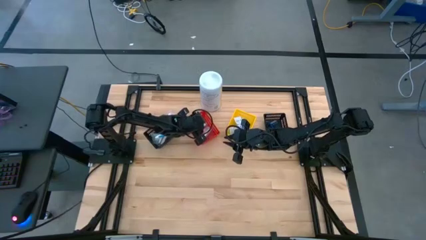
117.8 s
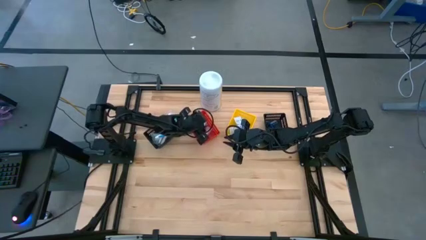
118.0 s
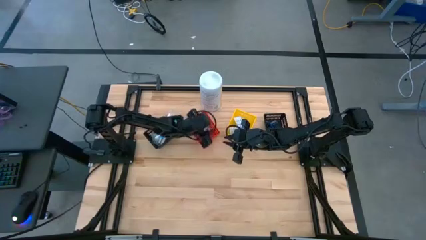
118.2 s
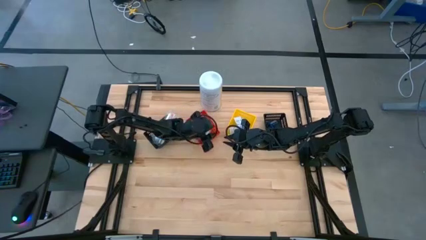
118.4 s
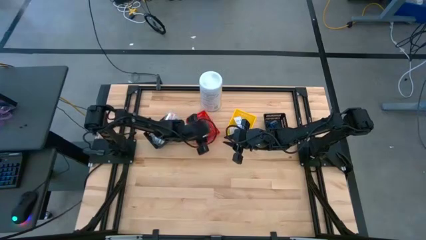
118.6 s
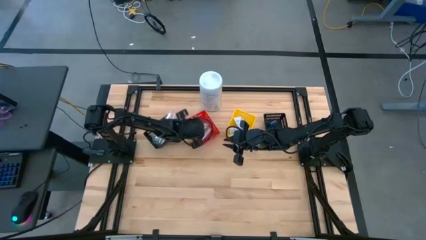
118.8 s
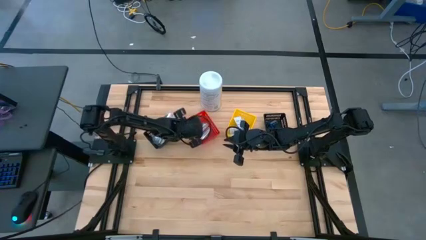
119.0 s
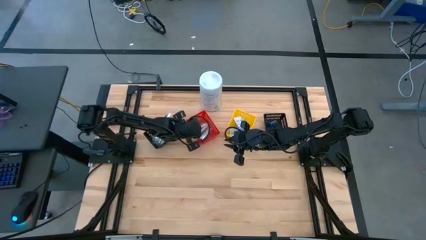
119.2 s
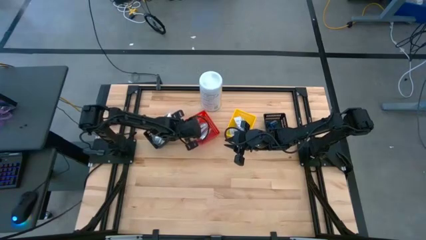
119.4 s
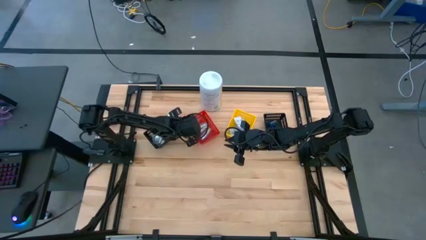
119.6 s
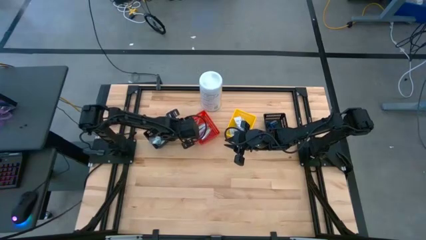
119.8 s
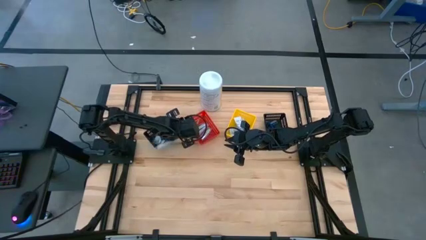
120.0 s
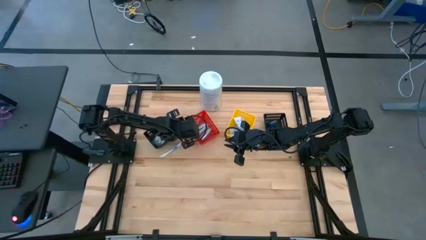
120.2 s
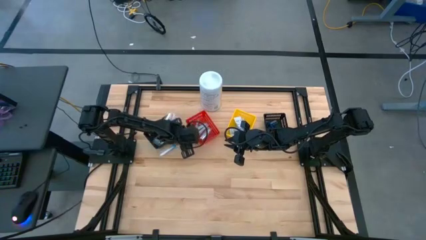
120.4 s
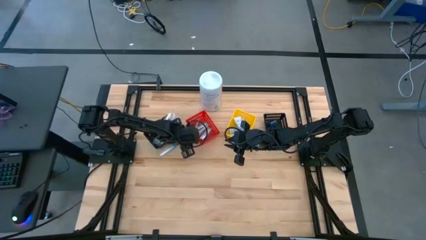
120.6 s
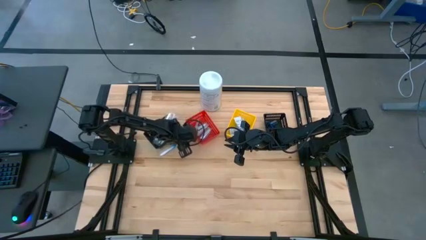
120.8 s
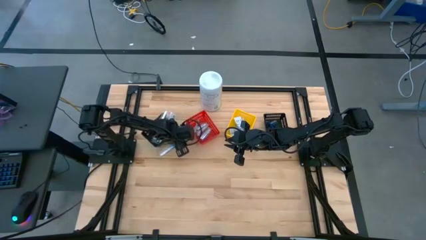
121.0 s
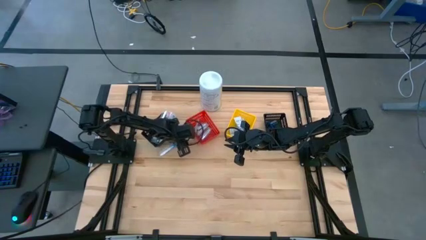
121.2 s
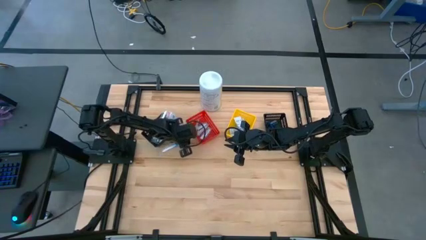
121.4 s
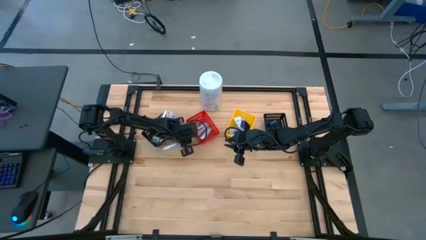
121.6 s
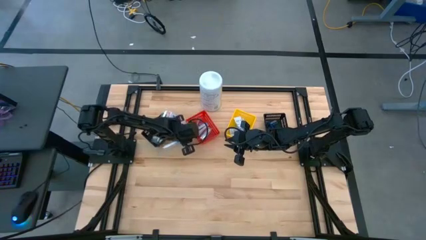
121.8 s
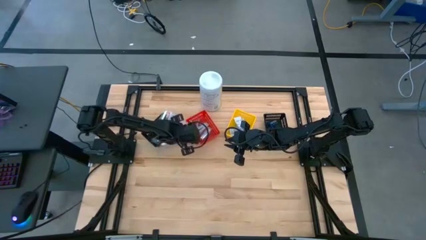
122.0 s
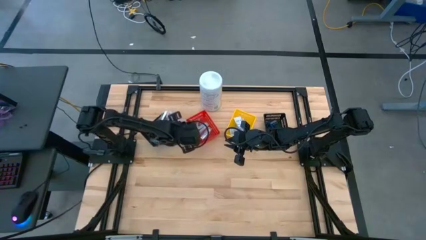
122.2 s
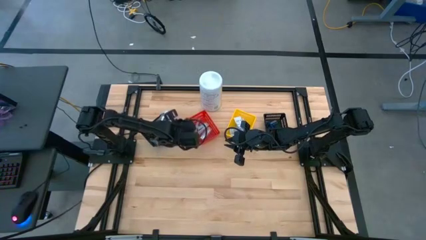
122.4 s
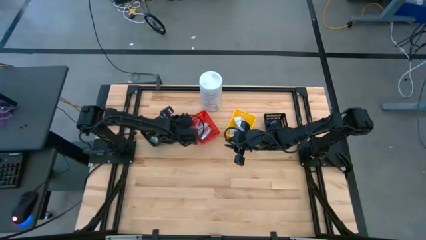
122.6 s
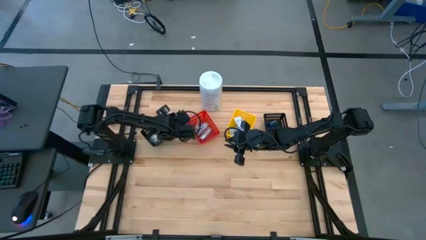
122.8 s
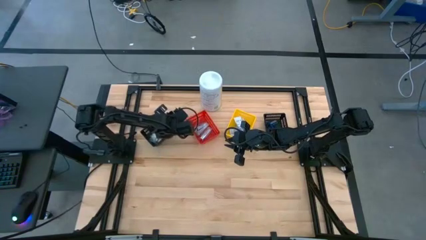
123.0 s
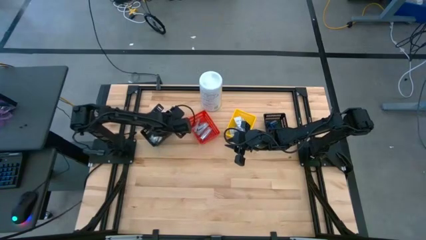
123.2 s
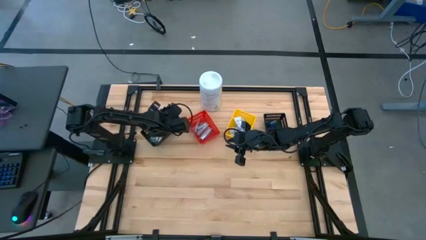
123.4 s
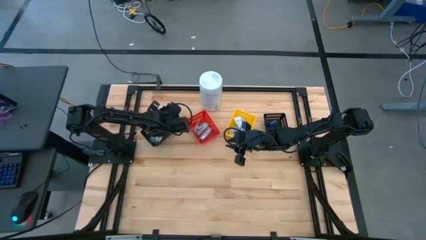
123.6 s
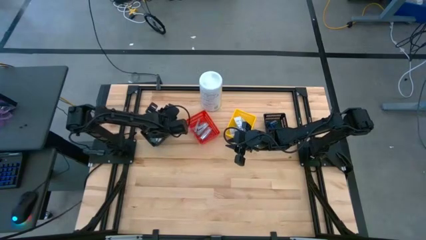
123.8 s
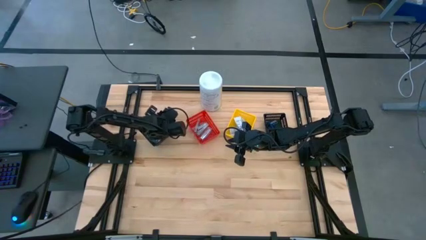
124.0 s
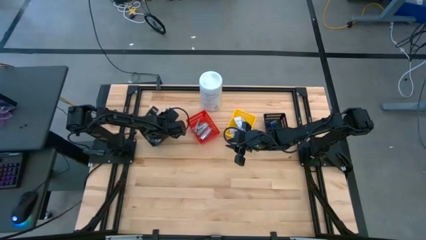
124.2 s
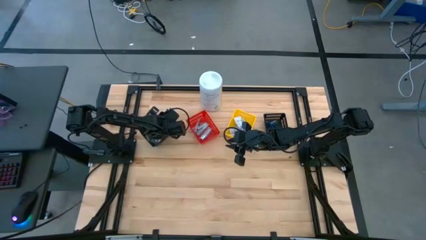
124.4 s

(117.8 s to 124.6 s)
Task: Pick & Place Travel size toiletries
Put the blue toothbrush into the left black basket

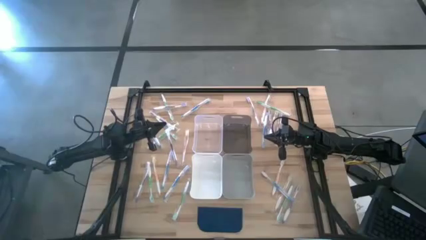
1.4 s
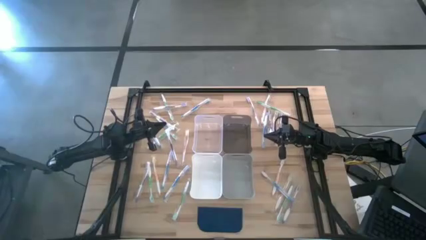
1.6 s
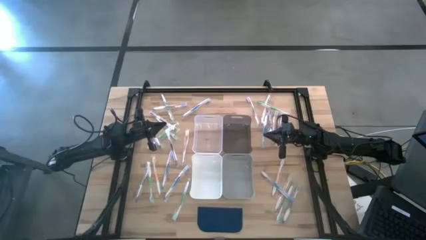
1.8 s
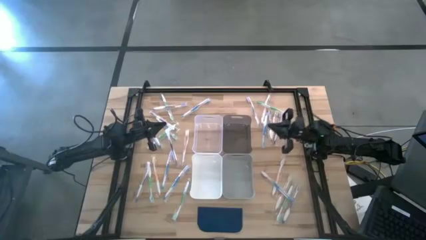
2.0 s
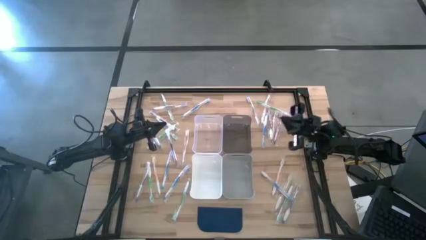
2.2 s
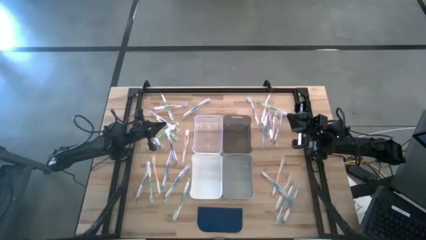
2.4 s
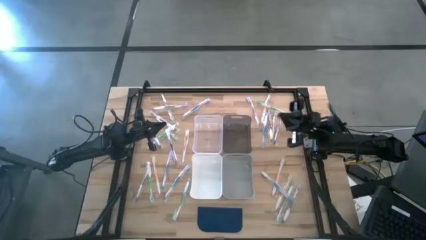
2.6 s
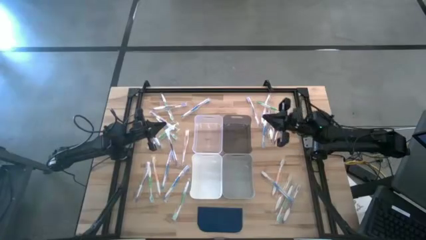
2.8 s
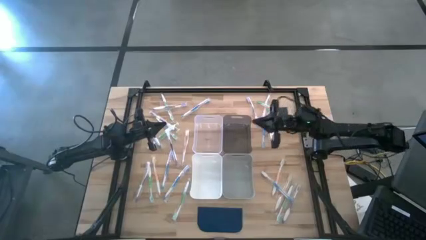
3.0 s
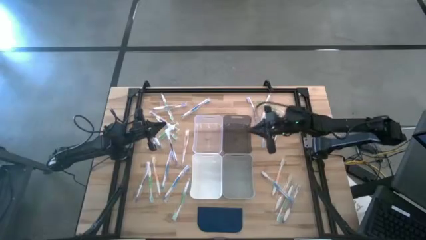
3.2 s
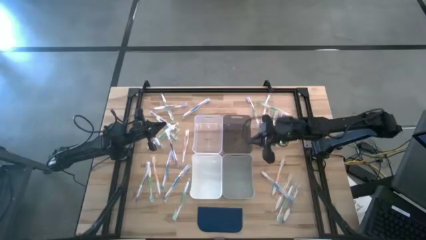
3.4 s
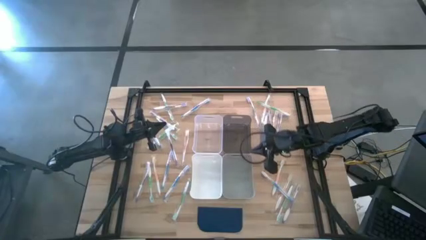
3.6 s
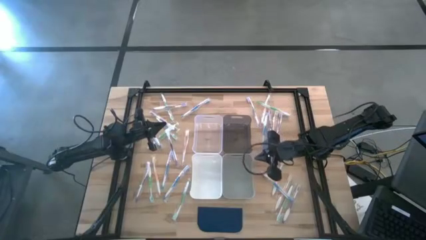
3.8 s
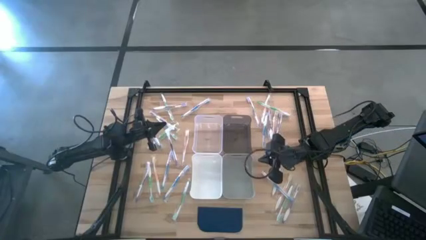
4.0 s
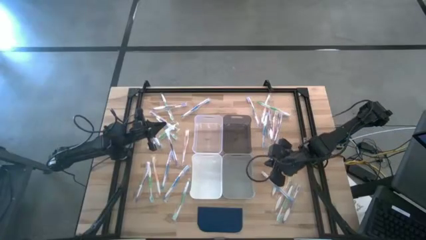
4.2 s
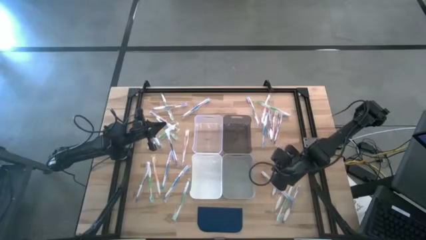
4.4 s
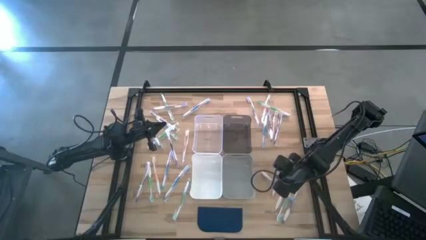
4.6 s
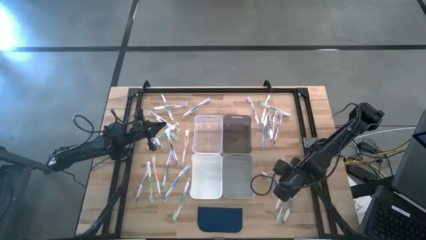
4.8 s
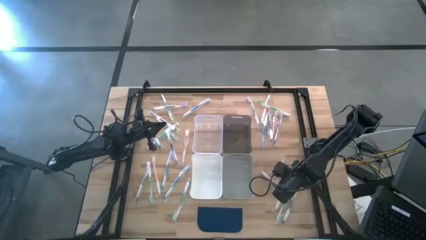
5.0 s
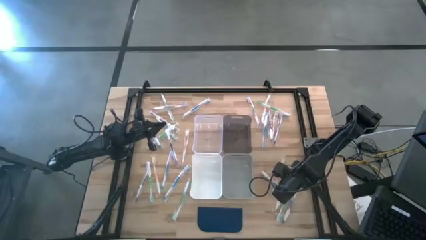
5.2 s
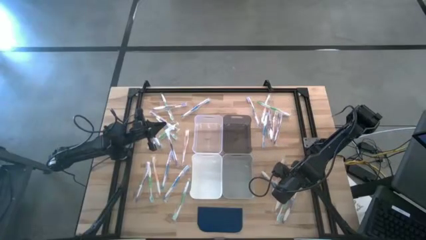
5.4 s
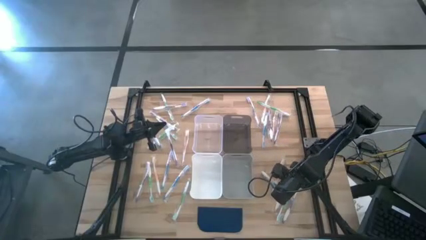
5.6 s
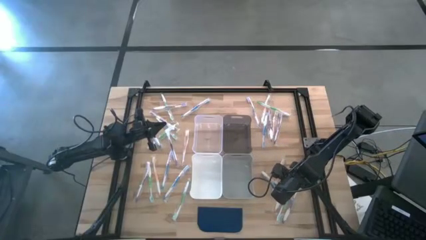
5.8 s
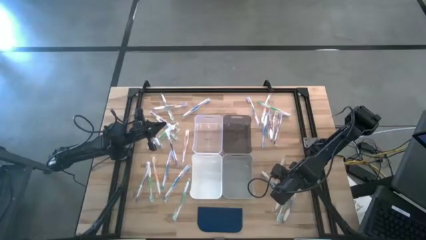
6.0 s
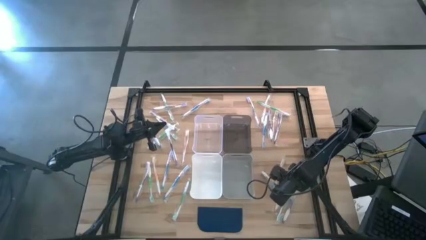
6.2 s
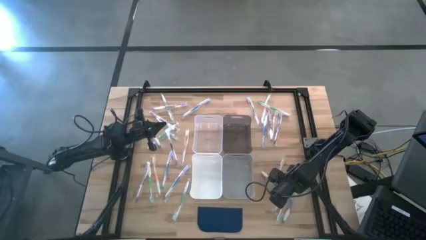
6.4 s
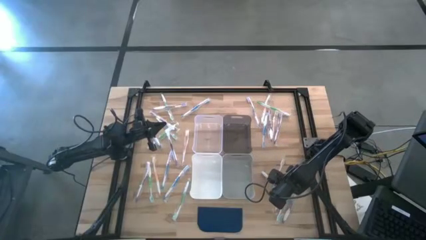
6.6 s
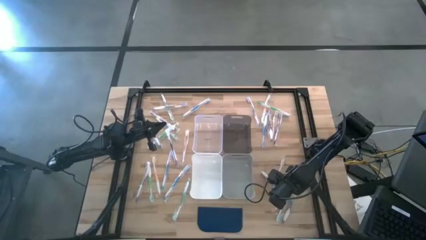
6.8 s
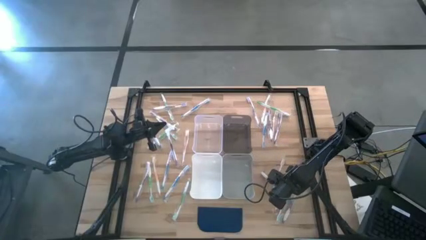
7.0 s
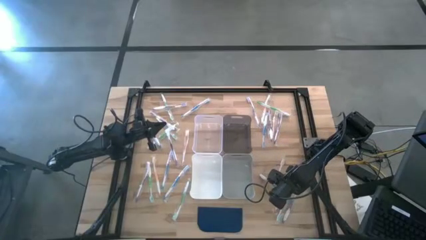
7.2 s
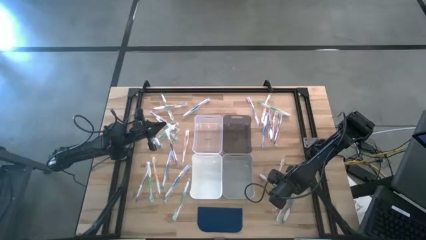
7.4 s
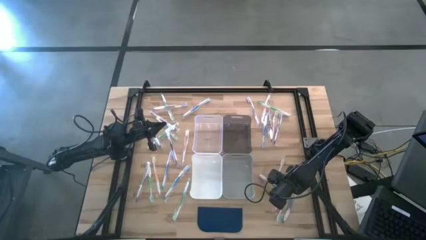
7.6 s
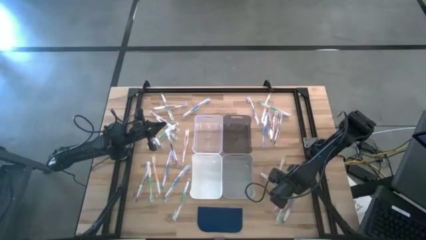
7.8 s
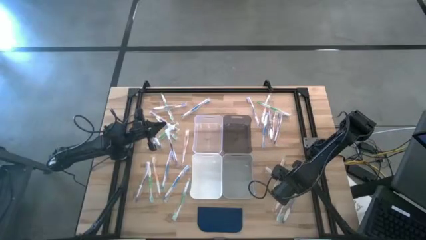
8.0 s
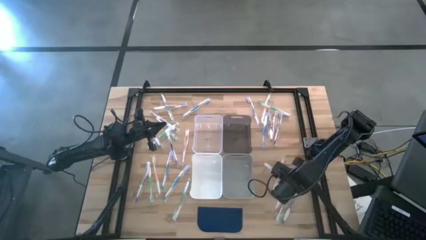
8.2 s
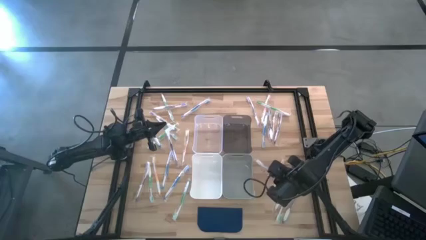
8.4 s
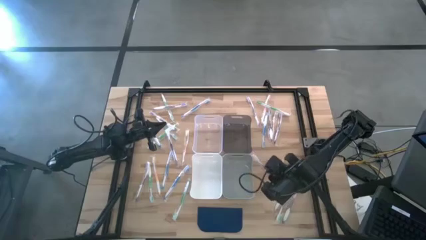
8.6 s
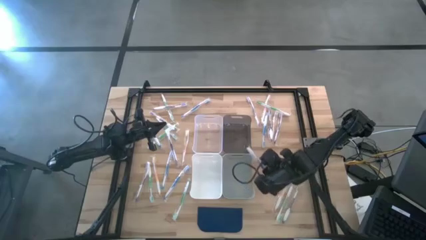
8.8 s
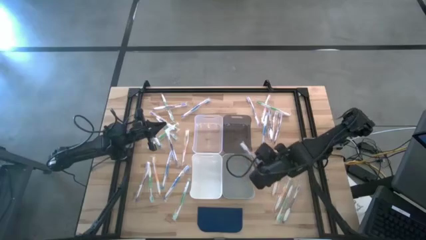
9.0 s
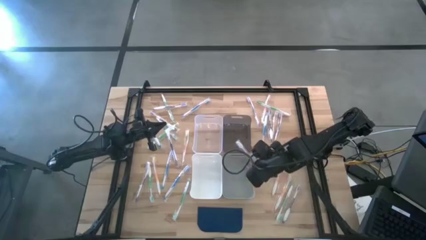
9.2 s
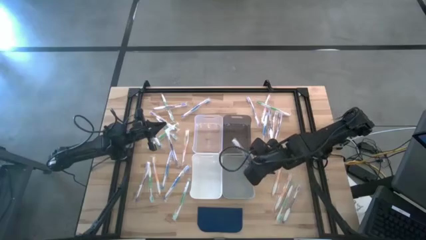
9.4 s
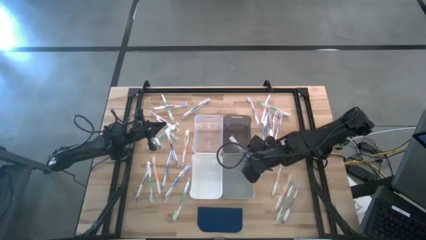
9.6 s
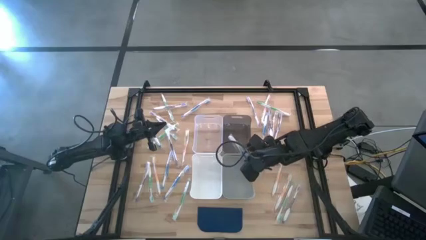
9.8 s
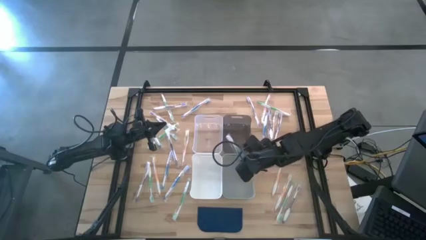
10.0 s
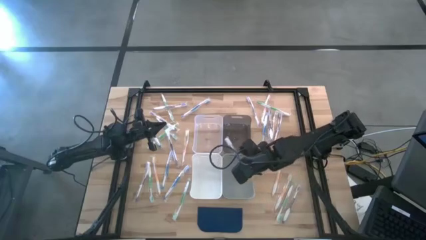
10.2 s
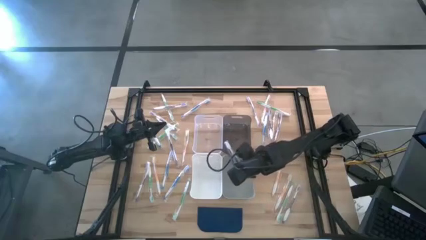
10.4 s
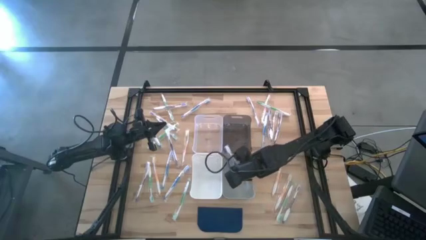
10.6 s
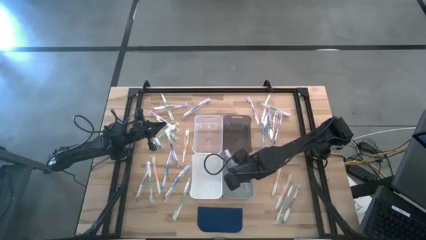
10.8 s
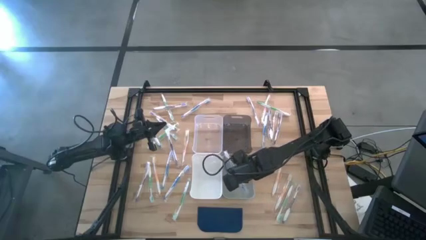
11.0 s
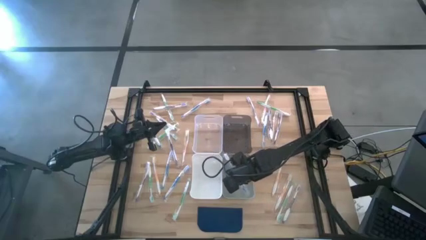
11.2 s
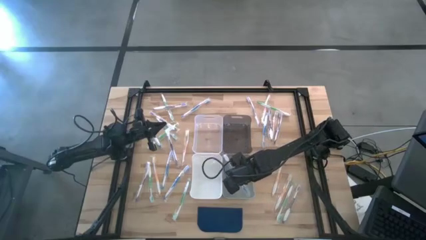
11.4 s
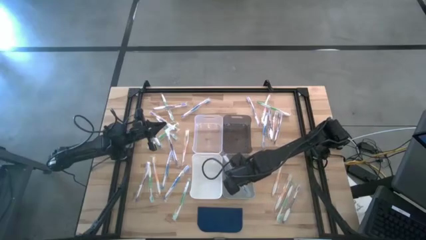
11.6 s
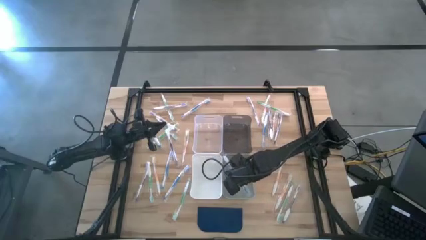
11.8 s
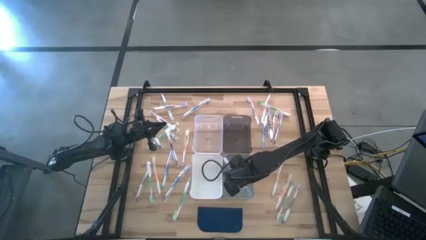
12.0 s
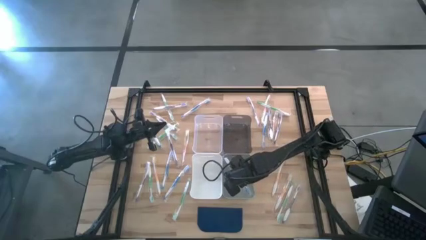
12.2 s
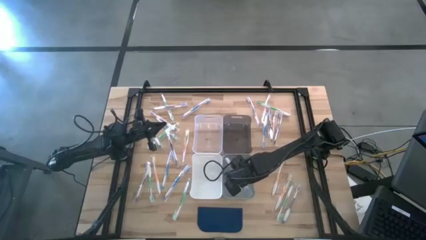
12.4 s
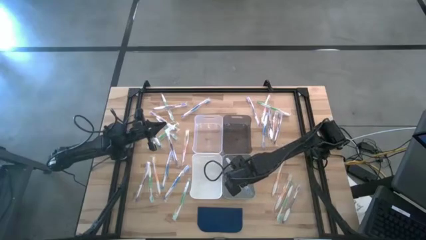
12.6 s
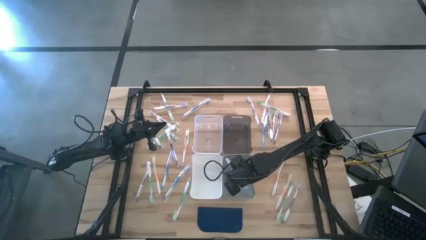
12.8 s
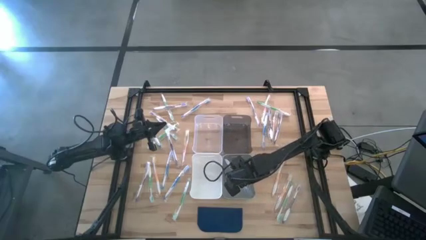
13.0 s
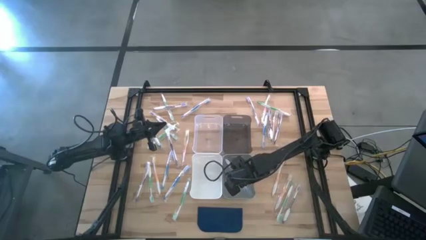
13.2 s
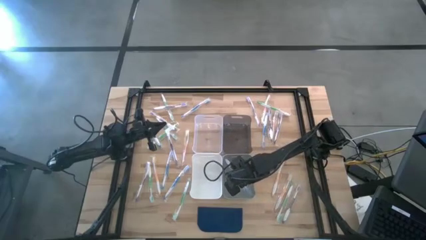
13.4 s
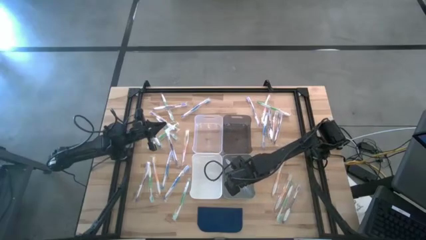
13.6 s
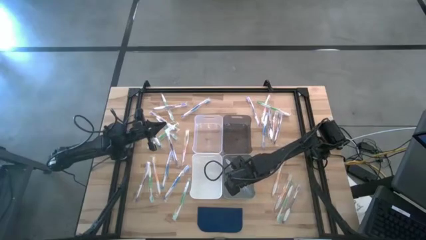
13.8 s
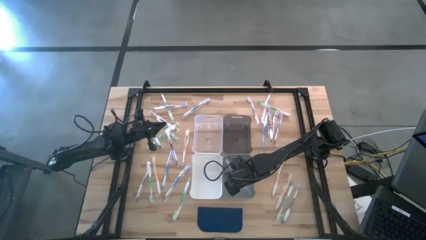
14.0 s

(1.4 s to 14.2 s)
Task: Pick & Place Toothbrushes
Put the blue toothbrush into the gray bin
